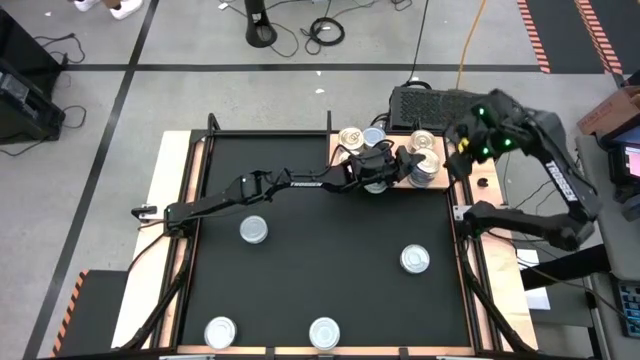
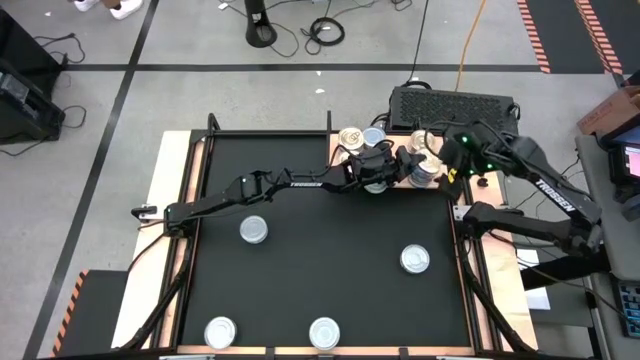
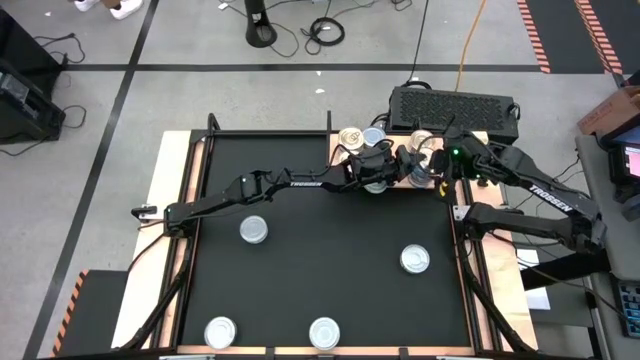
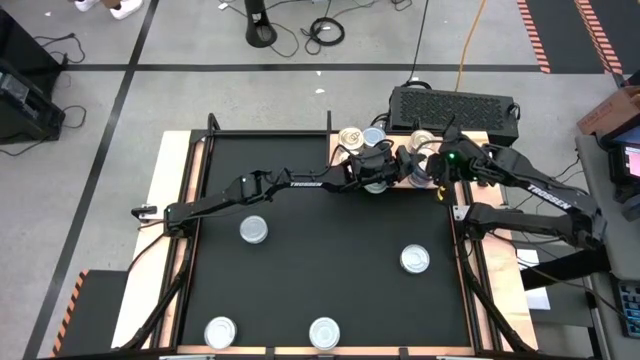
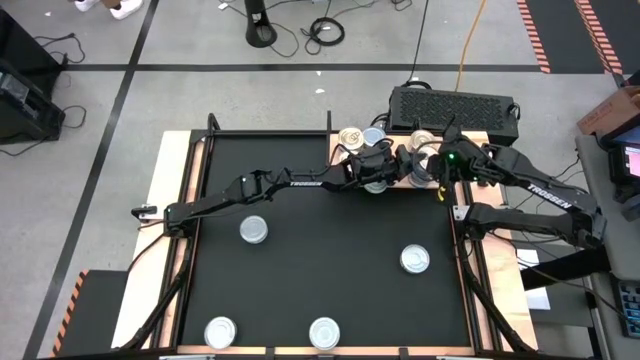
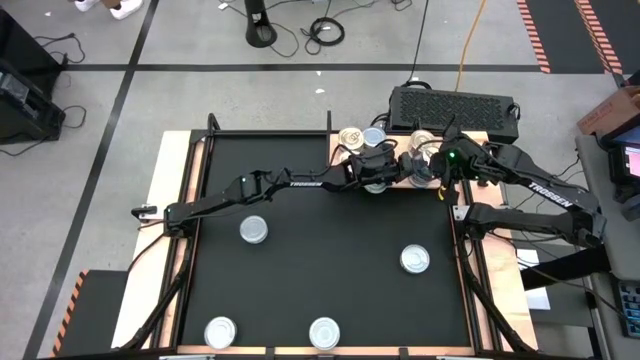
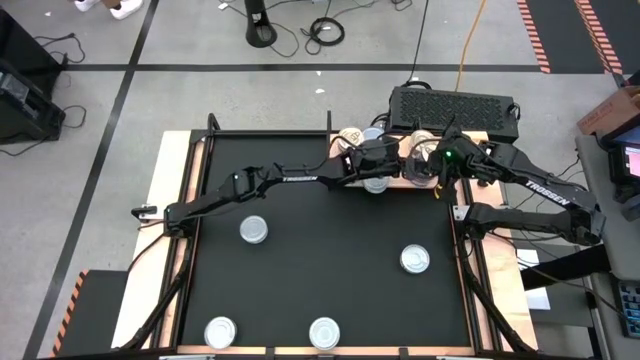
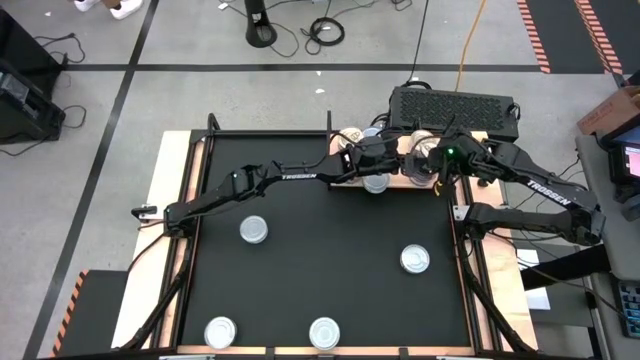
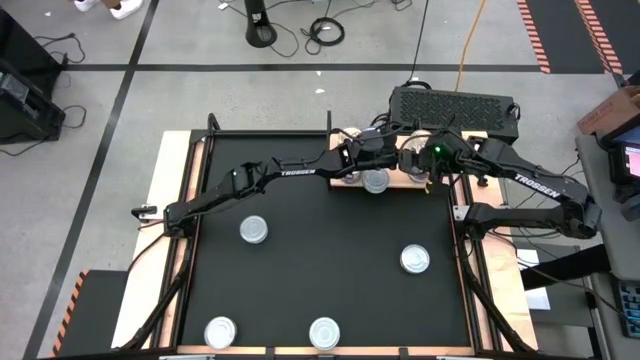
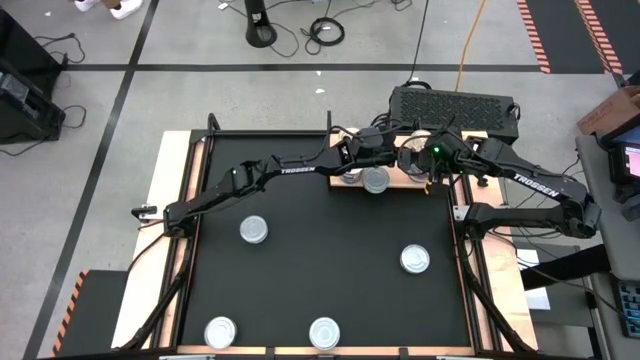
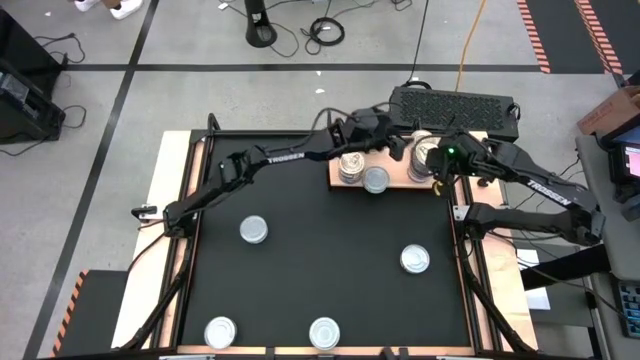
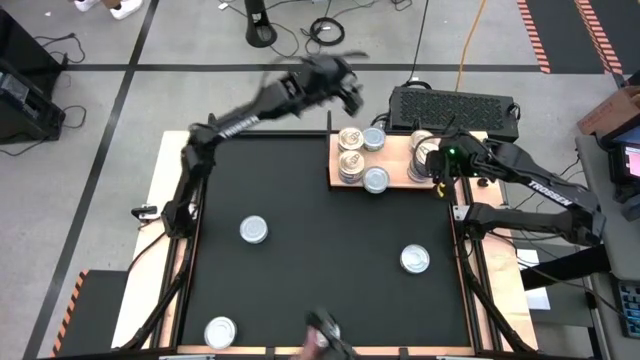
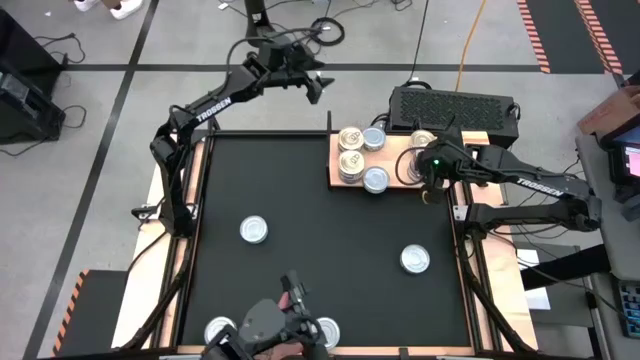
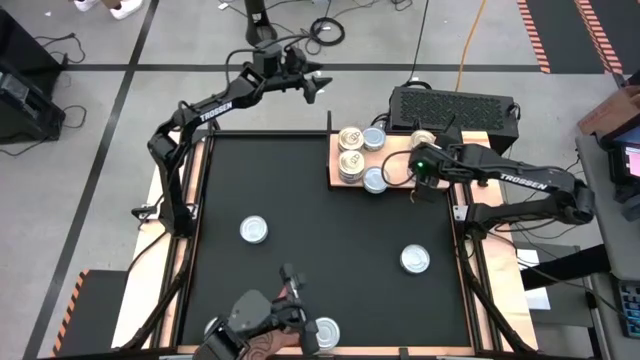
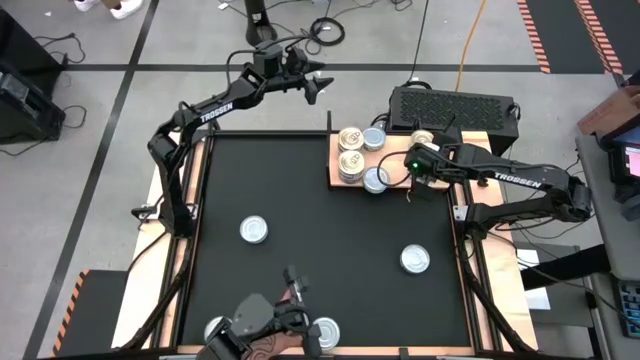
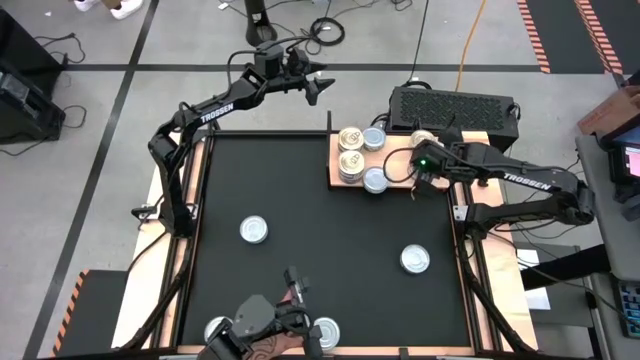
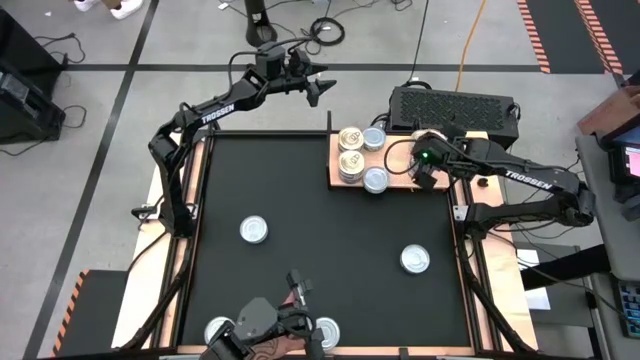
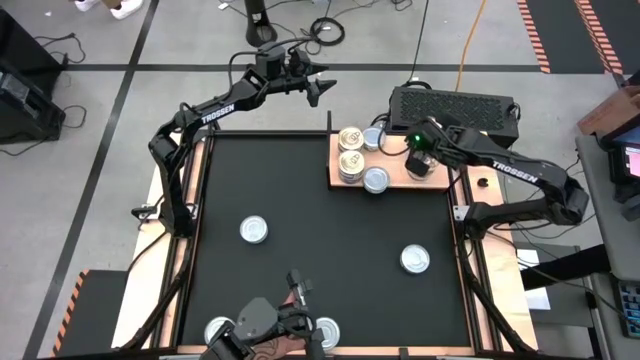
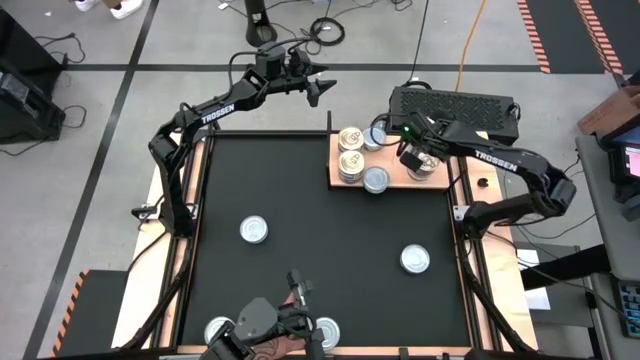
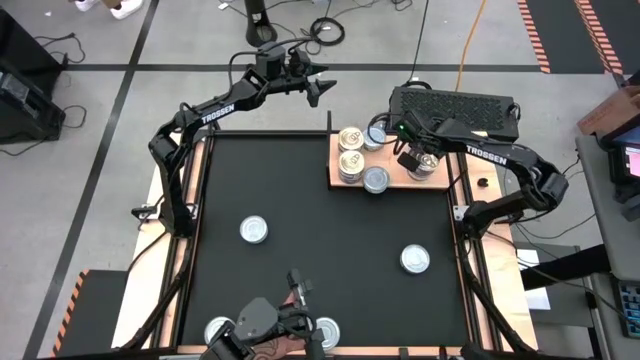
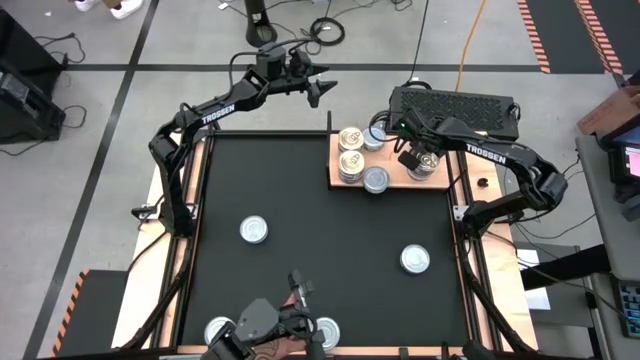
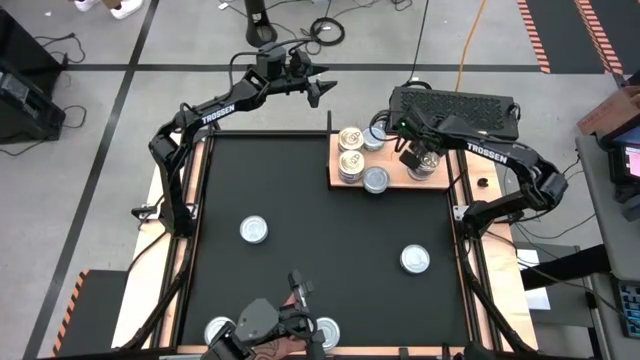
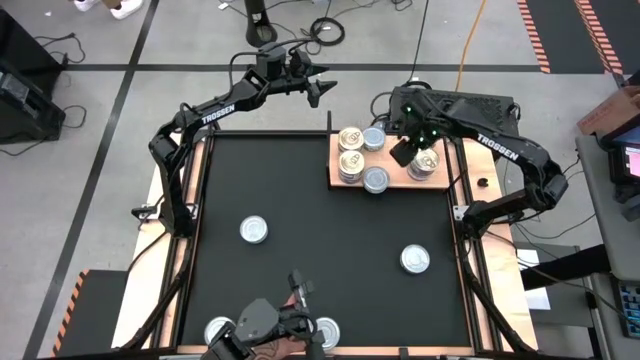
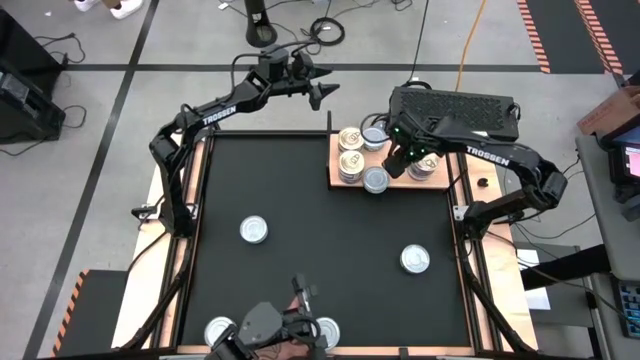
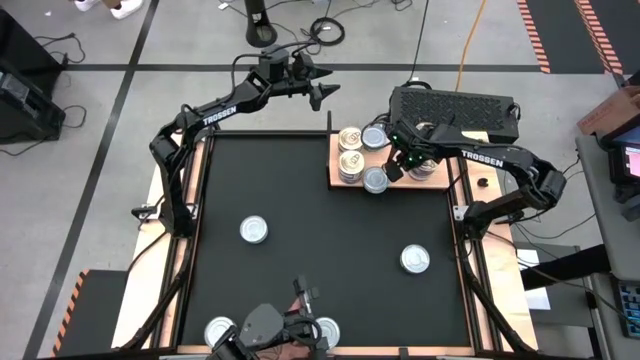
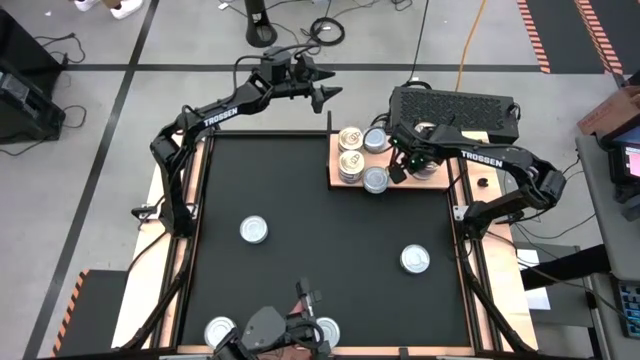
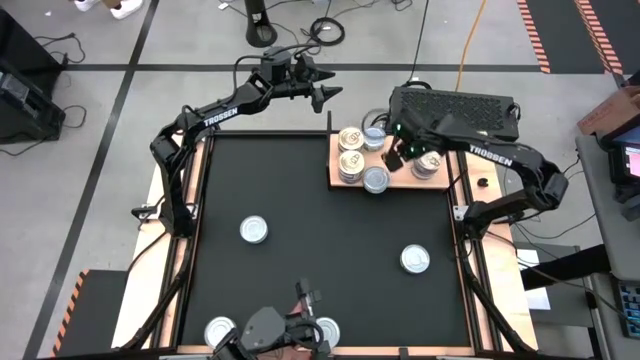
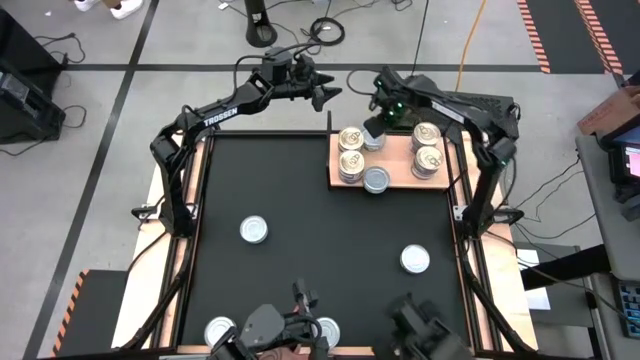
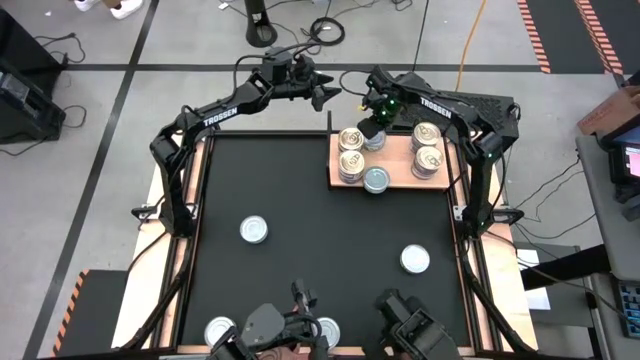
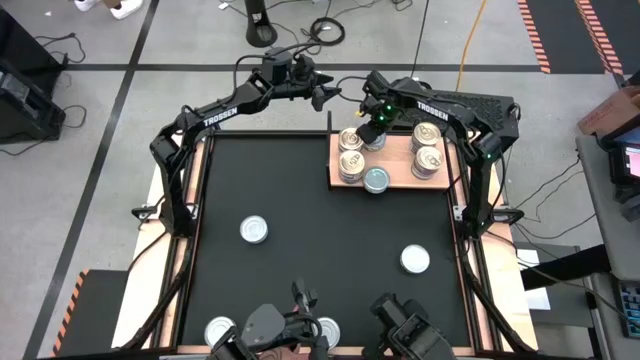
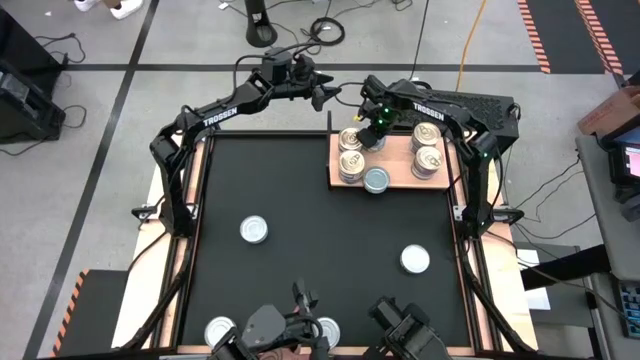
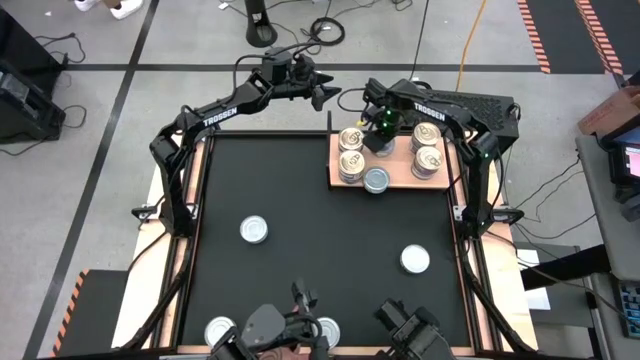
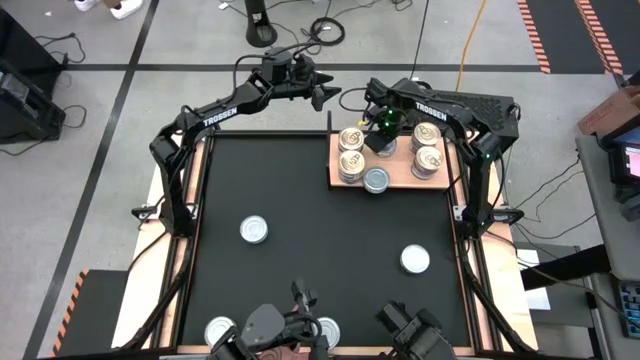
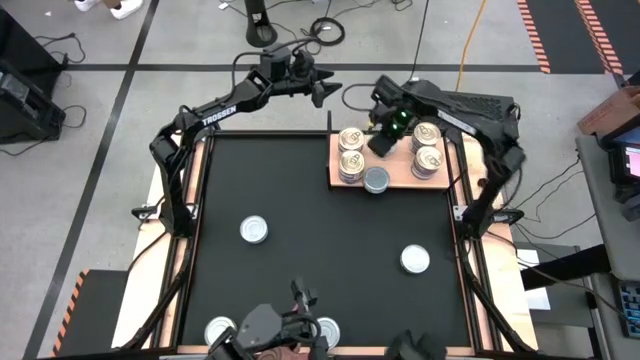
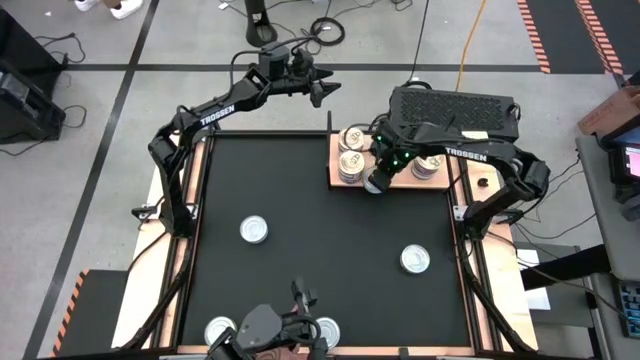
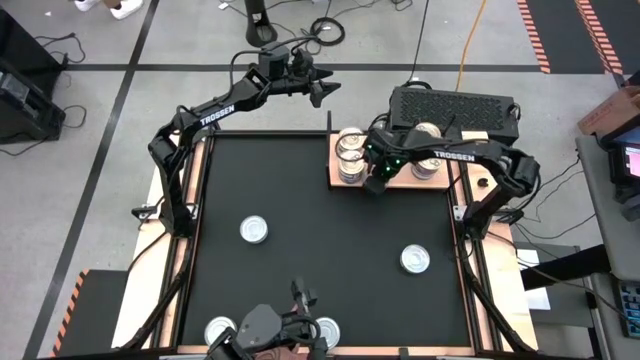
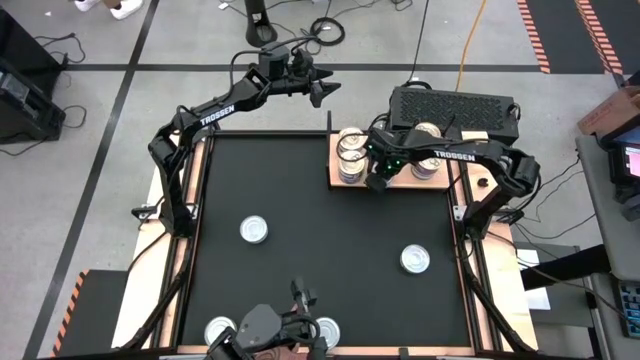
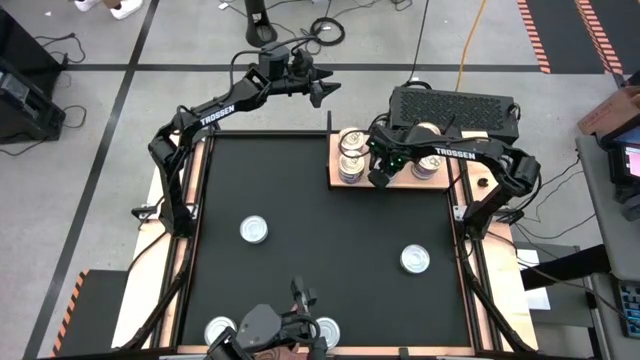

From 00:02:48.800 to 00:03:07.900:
Task: Stack canned seafood by type on shelf
Stack the blue pink tuna can on top of the other blue pink tuna can on the shelf

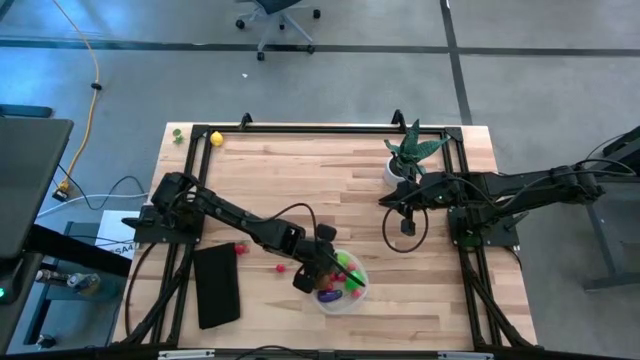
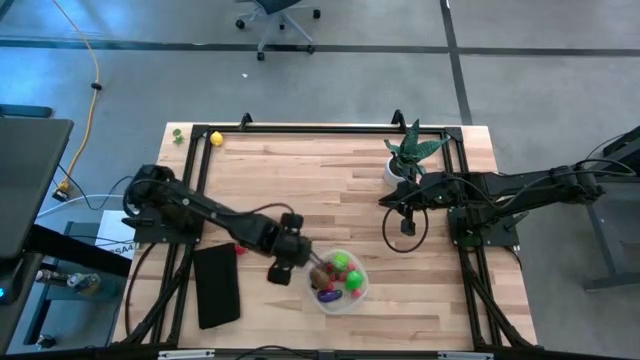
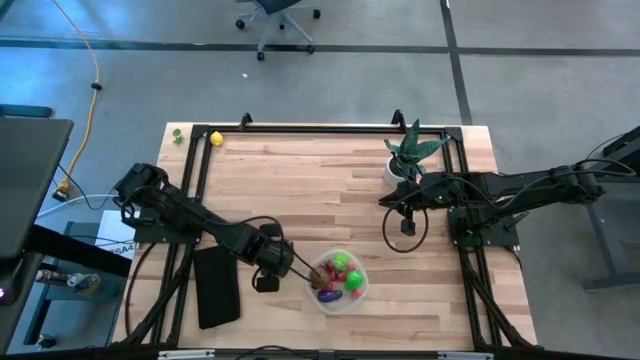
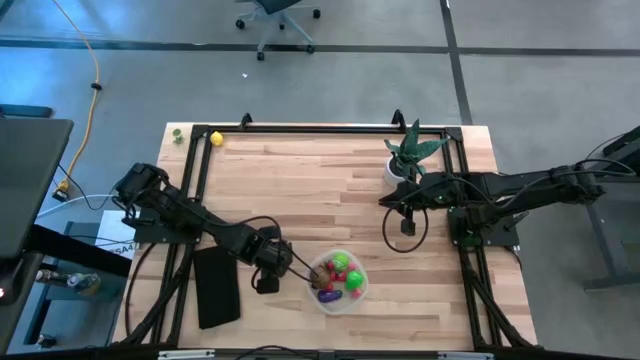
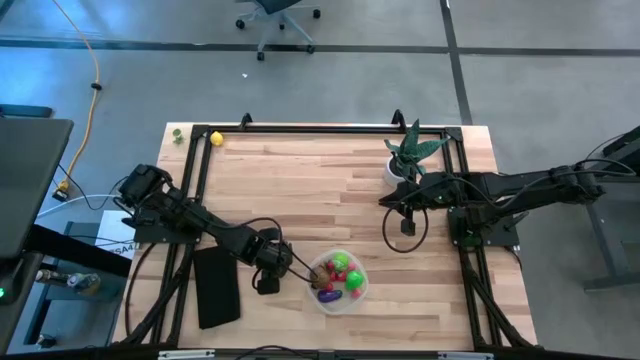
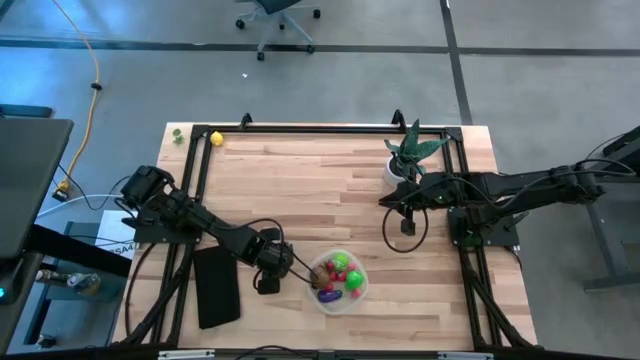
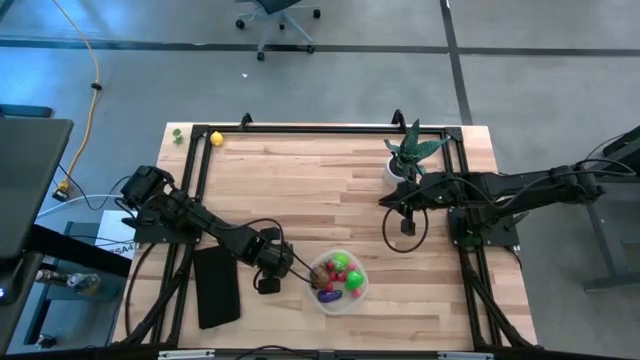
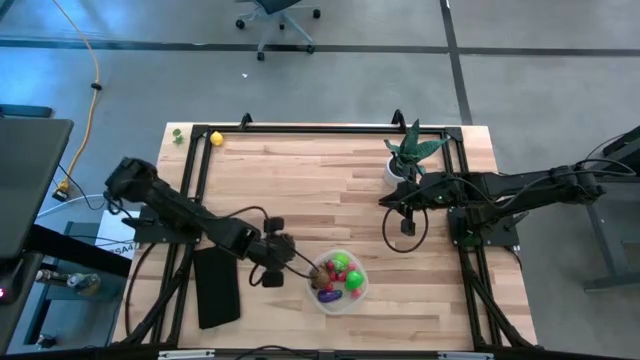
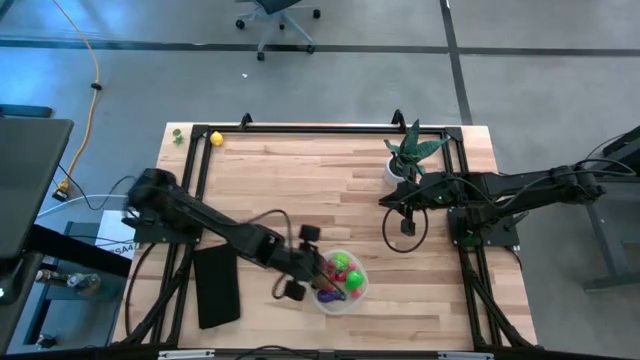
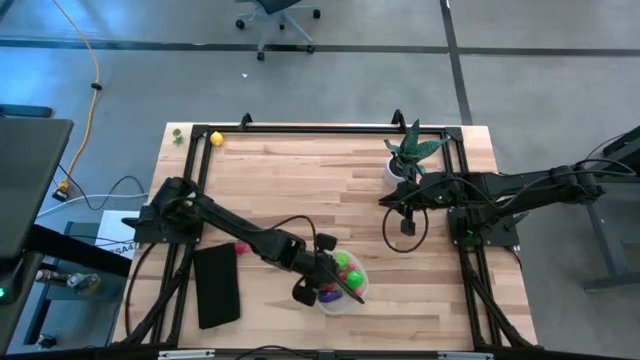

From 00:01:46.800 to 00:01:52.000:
Task: Pick and placing Produce into tupperware
Put the red cherry into the transparent container
